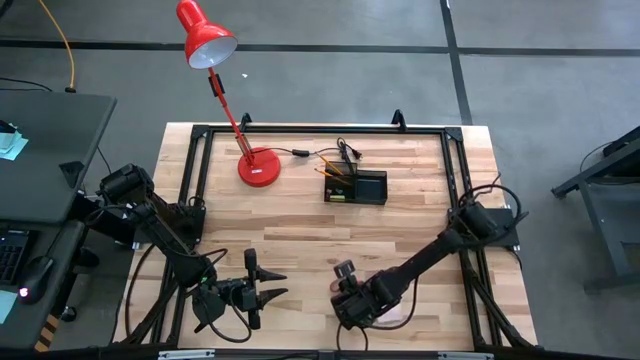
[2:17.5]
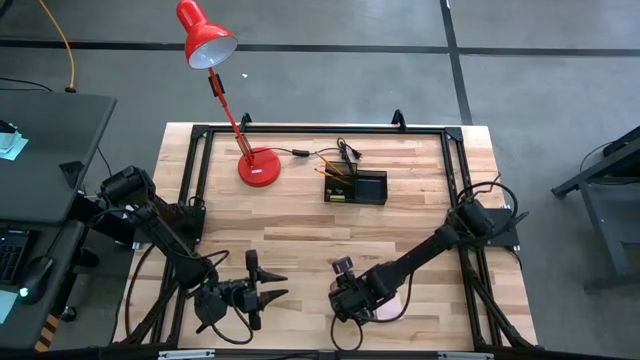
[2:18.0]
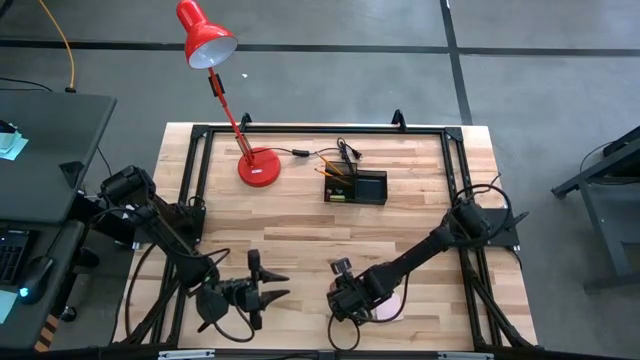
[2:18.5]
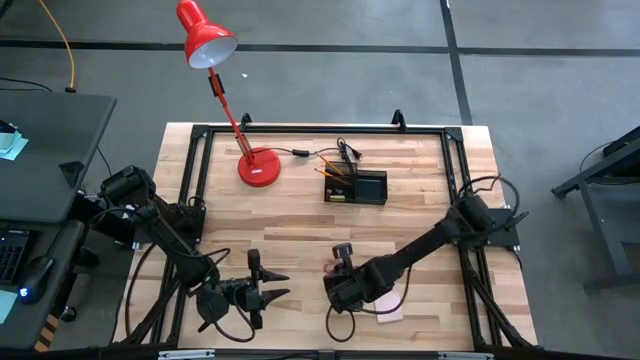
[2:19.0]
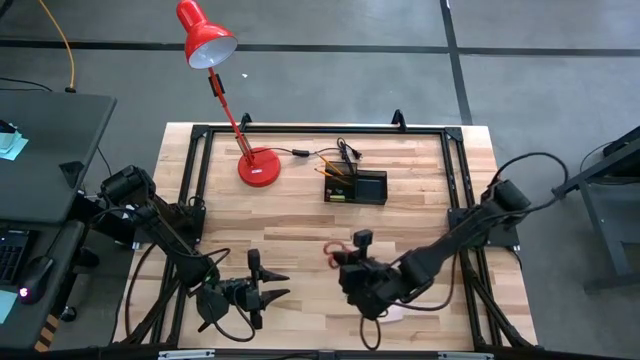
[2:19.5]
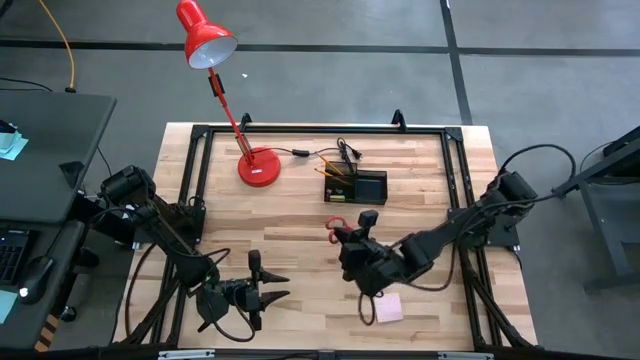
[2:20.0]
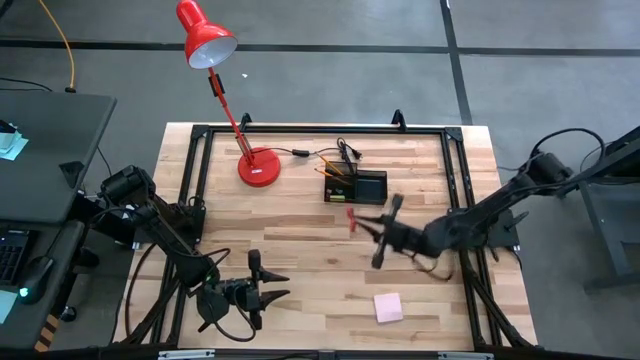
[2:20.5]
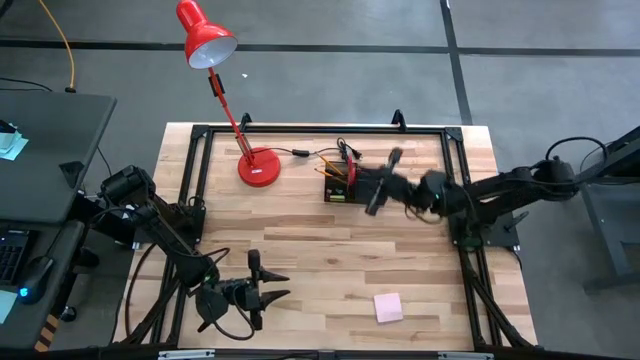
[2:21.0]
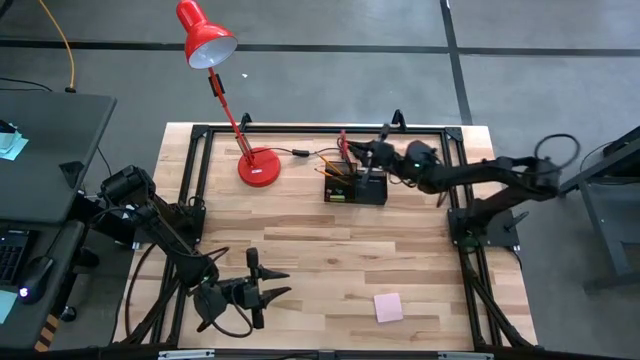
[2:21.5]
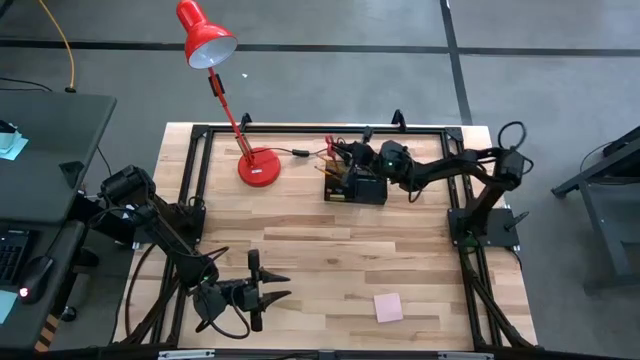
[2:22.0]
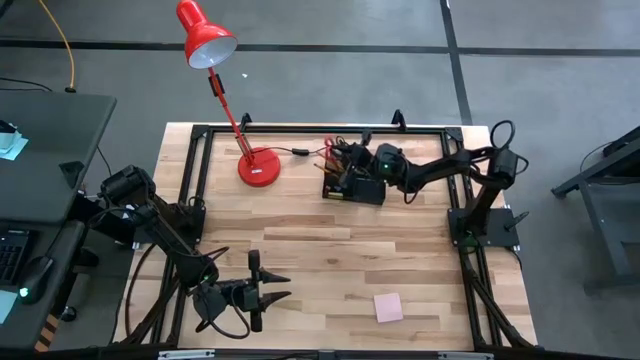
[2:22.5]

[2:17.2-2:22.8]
Task: Pick and place office supplies into organizer
Put the red scissors into the desk organizer

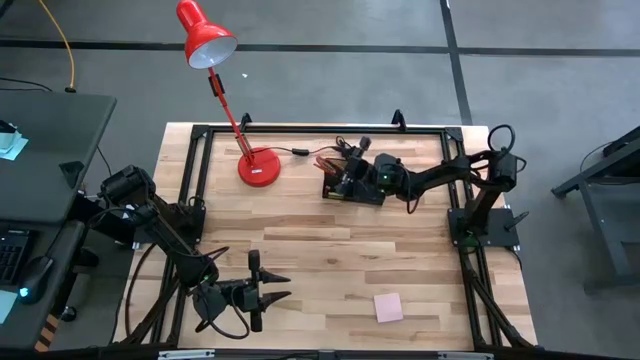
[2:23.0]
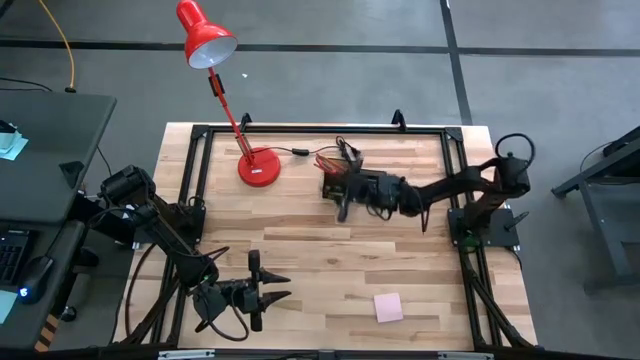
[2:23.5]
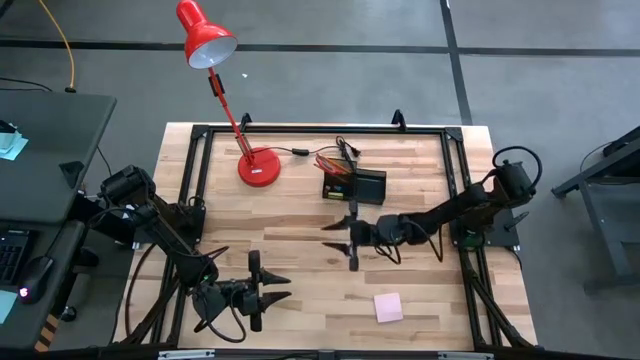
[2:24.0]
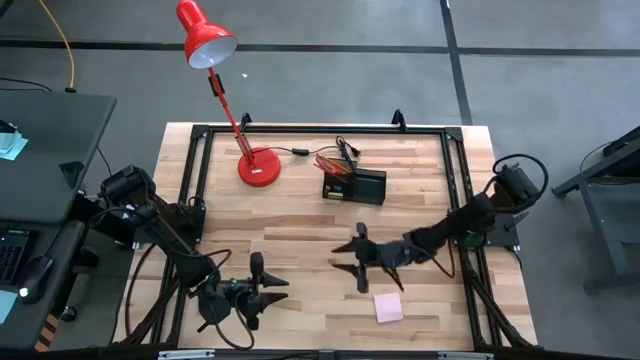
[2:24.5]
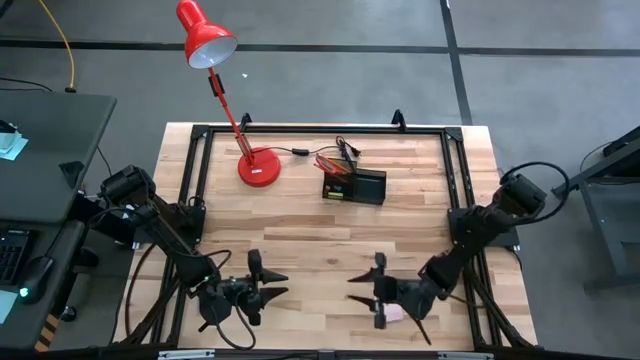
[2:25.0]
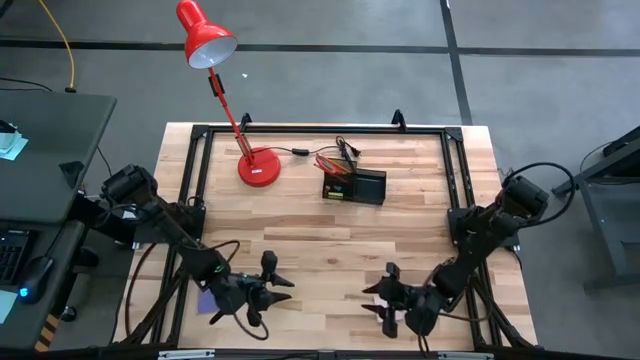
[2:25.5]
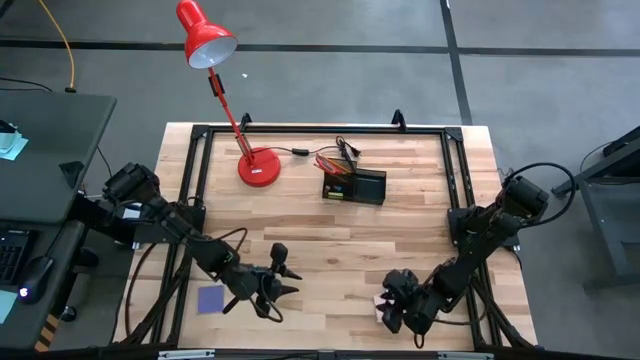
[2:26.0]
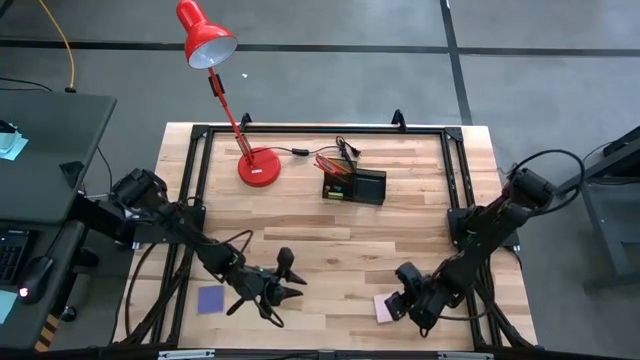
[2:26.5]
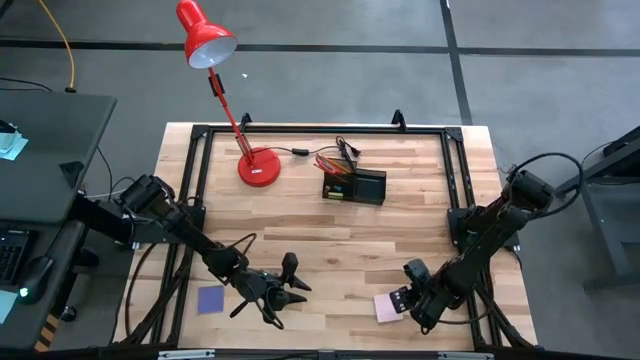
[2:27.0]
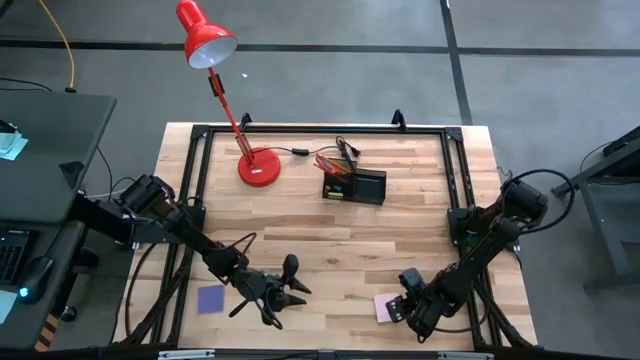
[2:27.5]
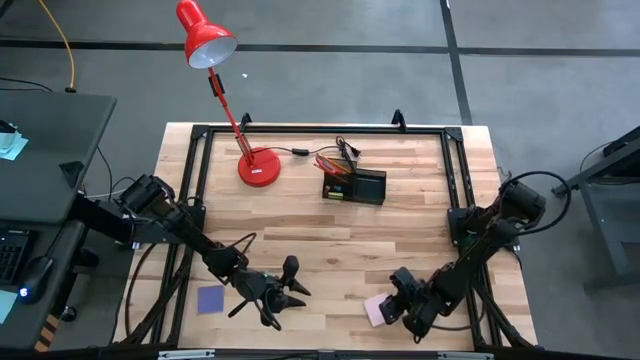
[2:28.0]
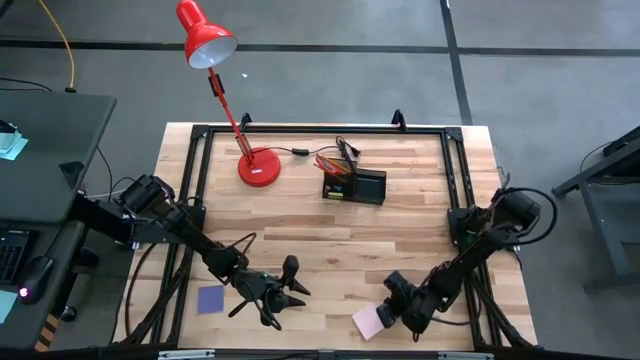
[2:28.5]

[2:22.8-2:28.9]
Put the pink sticky notes into the desk organizer

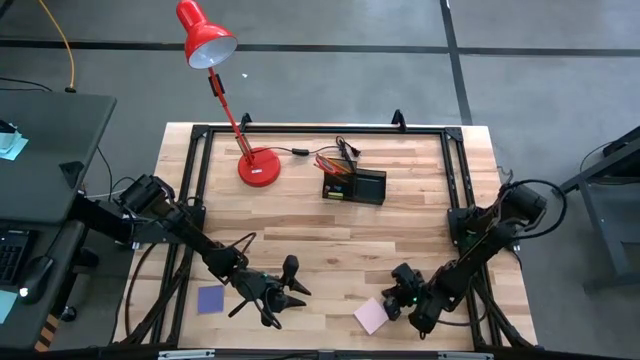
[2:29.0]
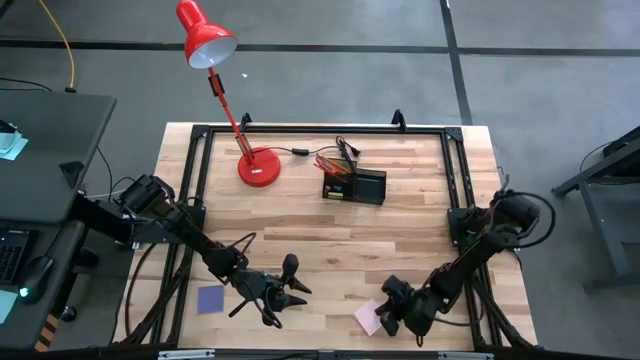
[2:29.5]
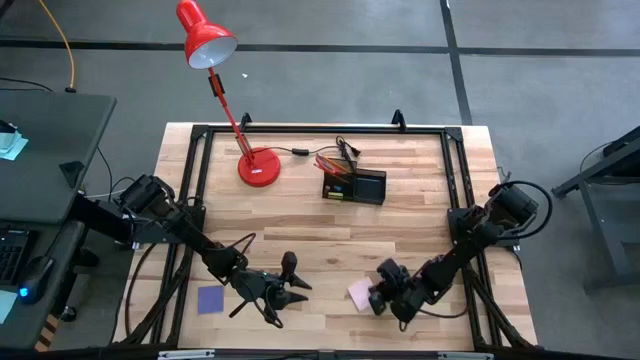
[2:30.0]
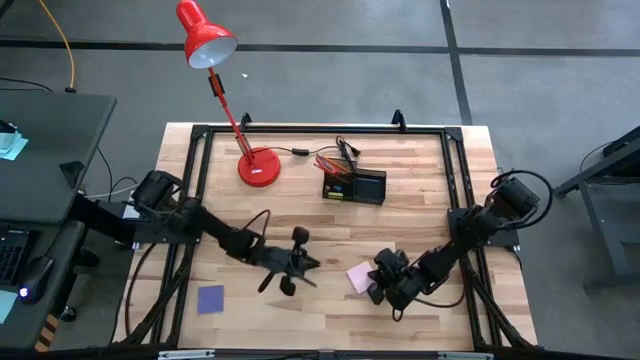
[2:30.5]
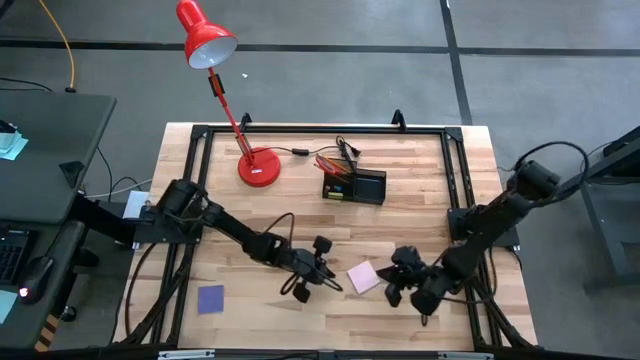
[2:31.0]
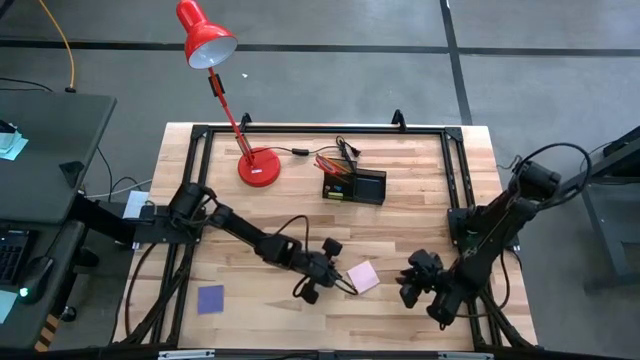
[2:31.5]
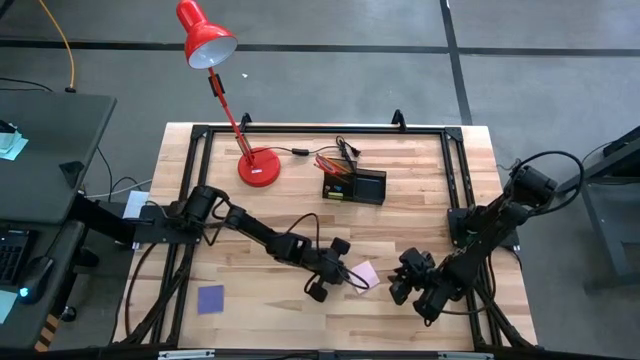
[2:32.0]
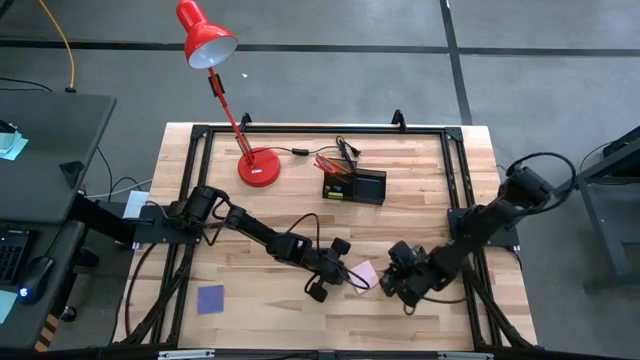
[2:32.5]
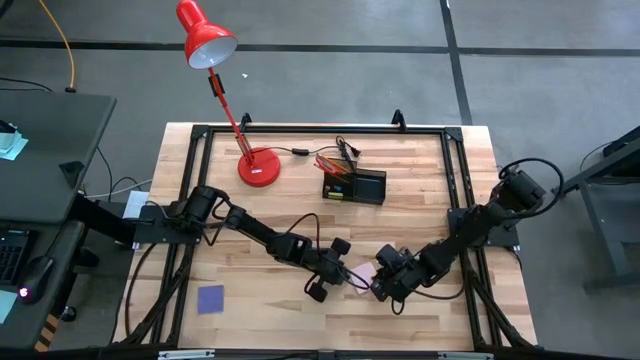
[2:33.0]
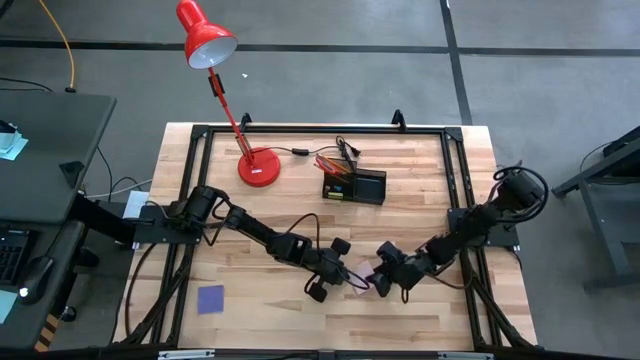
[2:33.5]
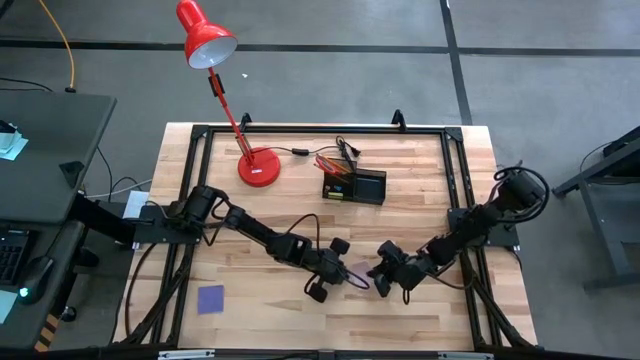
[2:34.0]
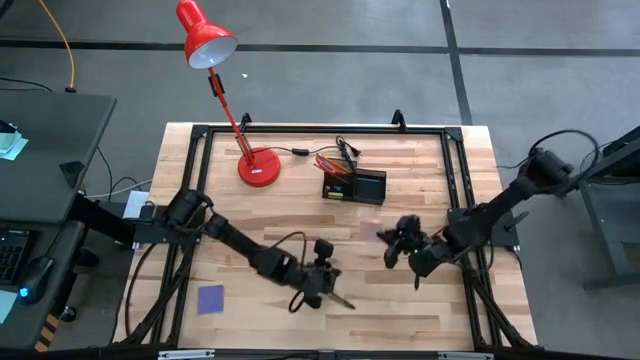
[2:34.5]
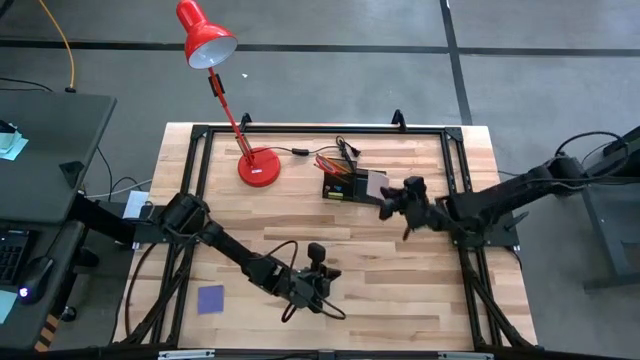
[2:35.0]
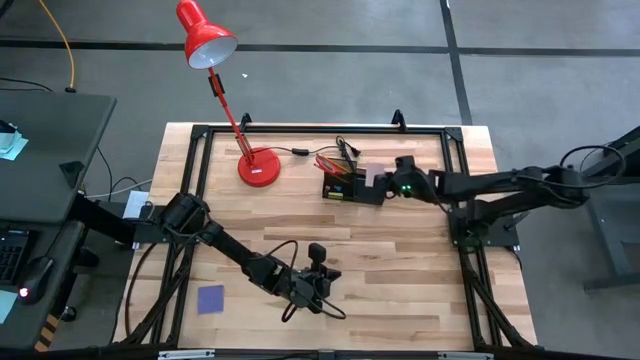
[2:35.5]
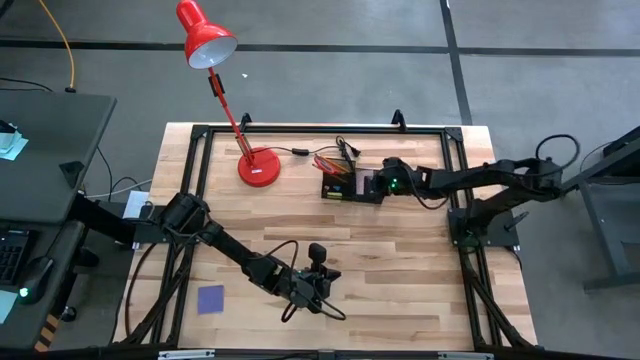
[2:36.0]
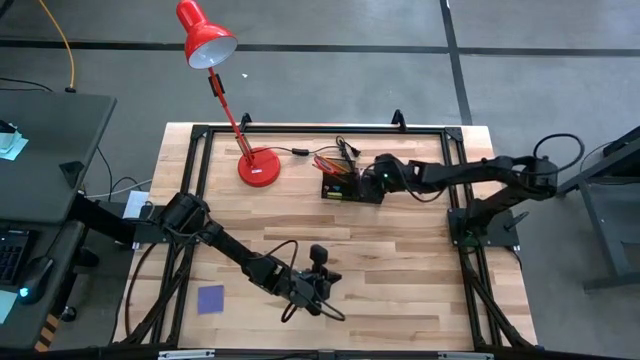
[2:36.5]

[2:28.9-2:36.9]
Put the pink sticky notes into the desk organizer

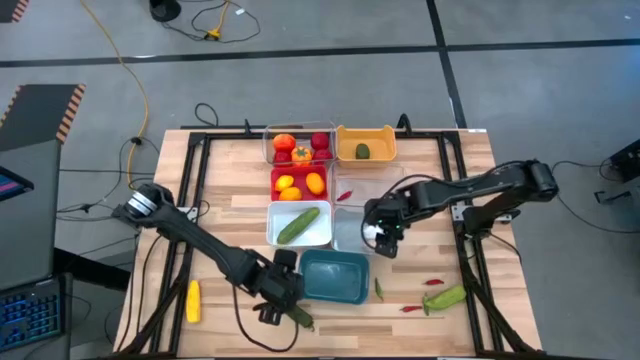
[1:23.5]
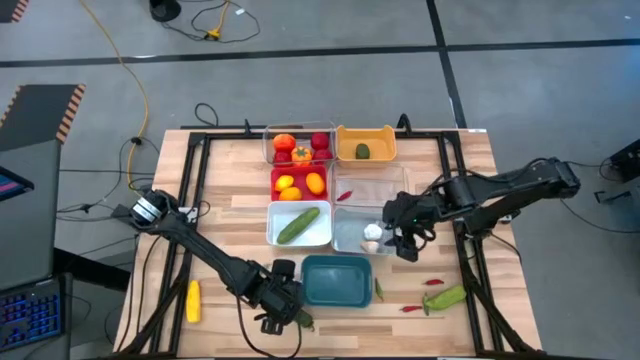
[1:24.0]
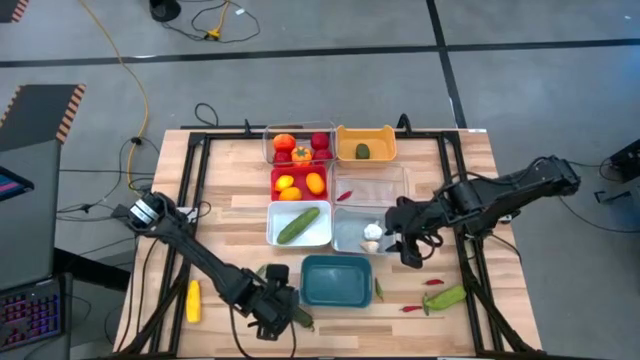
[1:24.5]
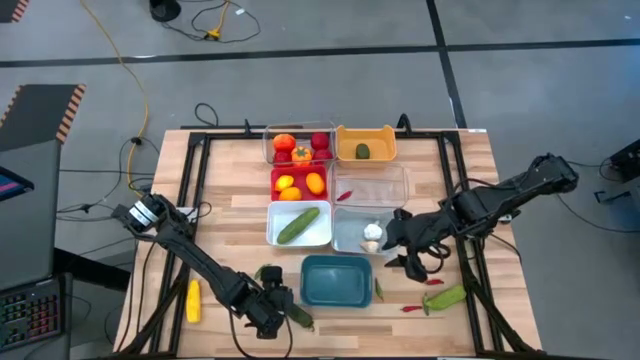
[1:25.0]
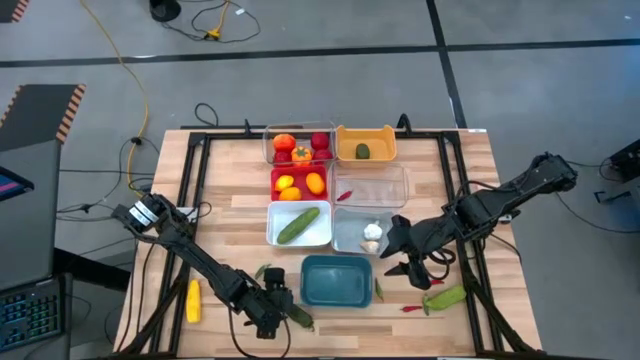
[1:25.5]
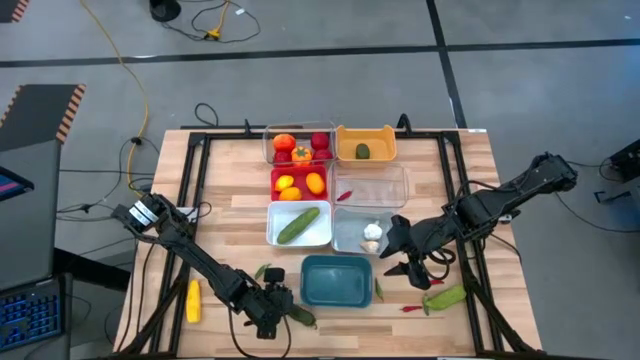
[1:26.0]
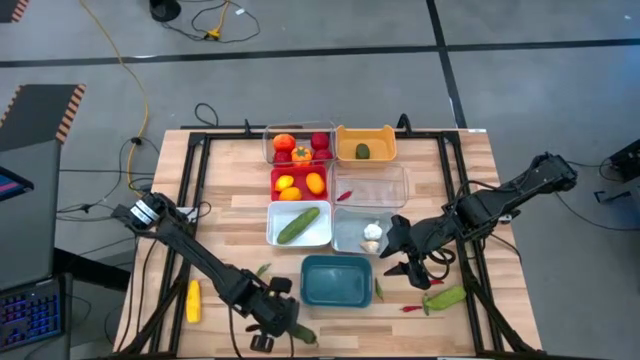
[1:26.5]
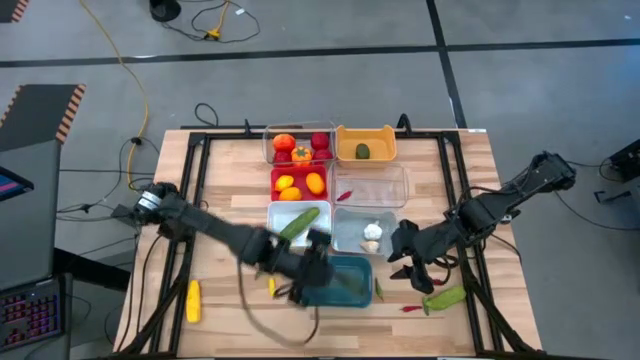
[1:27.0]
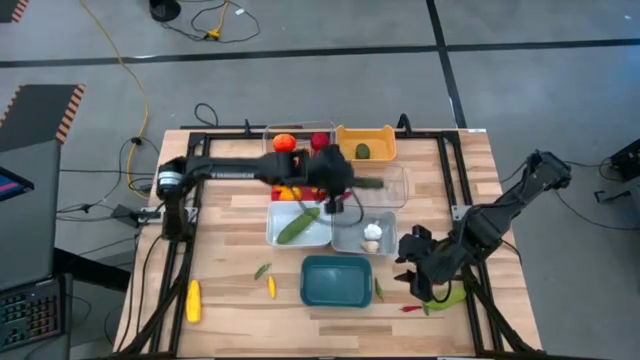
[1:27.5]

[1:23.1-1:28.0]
Task: Sort produce into baskets
Put the dark green chili pepper into the bottom transparent bin
